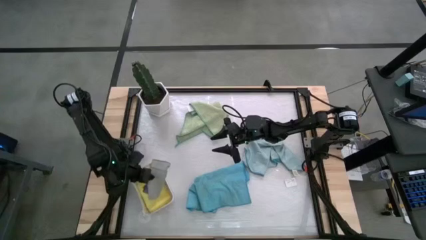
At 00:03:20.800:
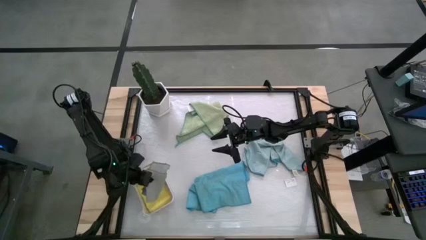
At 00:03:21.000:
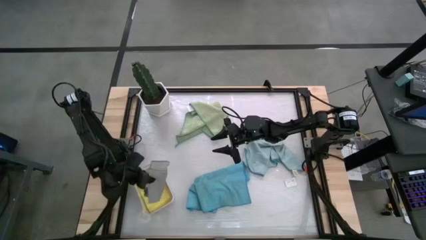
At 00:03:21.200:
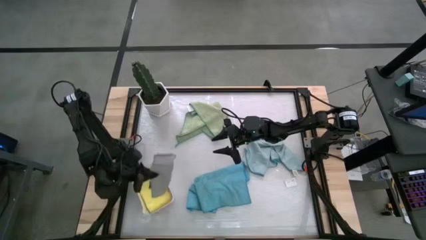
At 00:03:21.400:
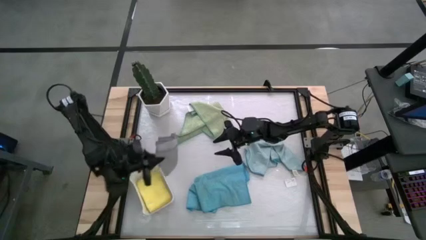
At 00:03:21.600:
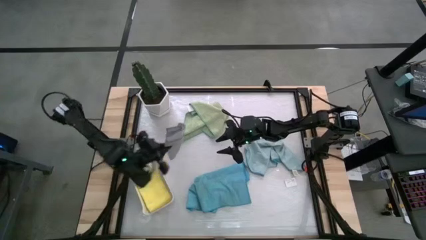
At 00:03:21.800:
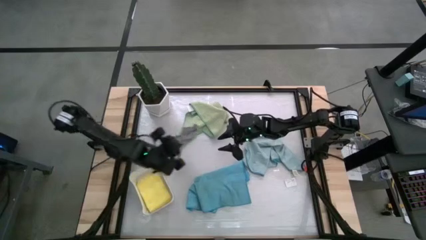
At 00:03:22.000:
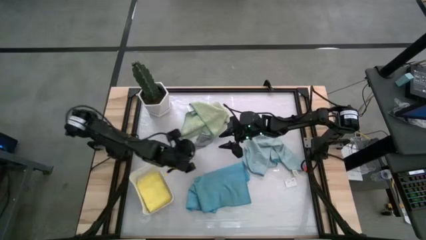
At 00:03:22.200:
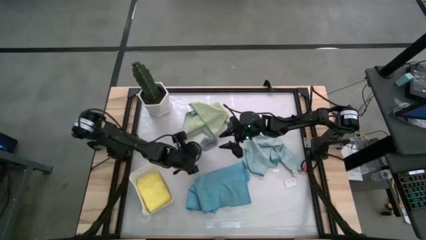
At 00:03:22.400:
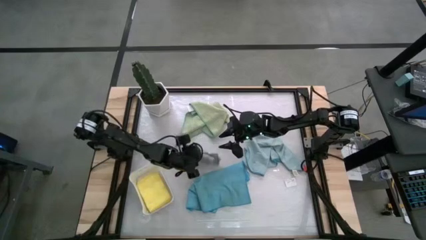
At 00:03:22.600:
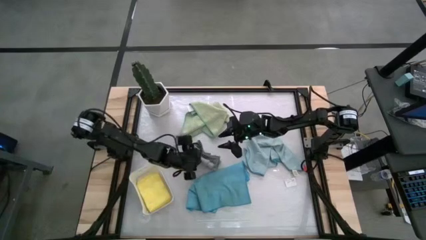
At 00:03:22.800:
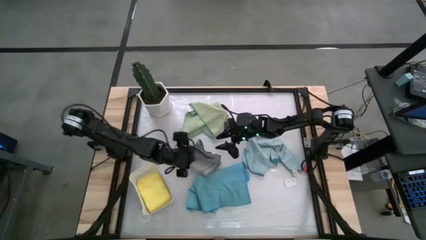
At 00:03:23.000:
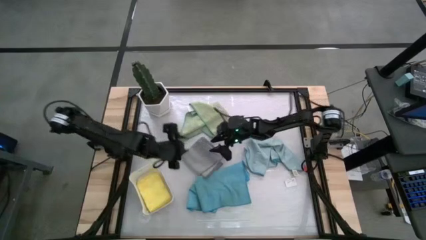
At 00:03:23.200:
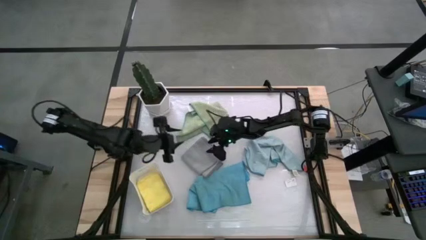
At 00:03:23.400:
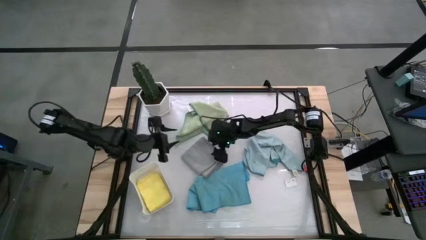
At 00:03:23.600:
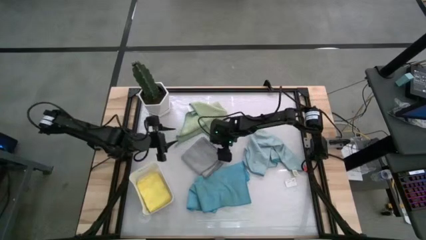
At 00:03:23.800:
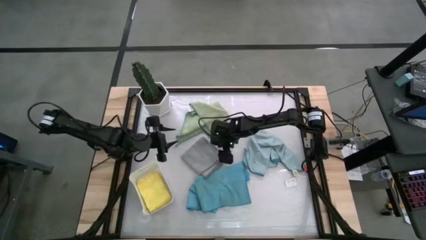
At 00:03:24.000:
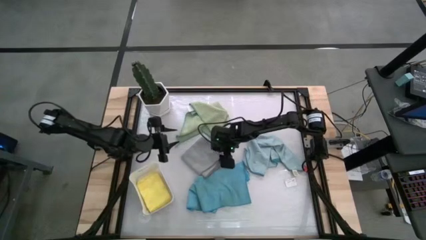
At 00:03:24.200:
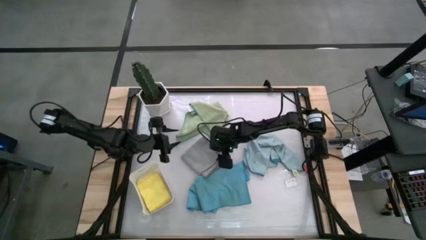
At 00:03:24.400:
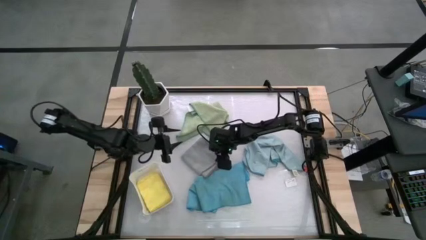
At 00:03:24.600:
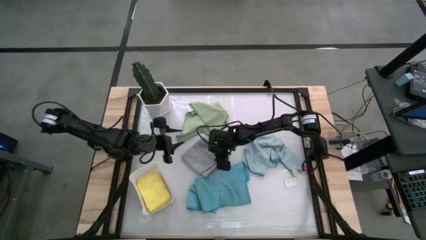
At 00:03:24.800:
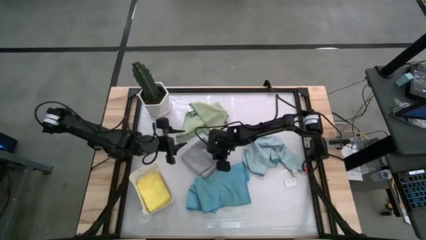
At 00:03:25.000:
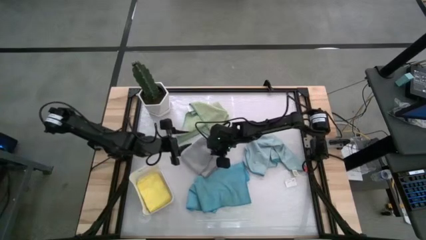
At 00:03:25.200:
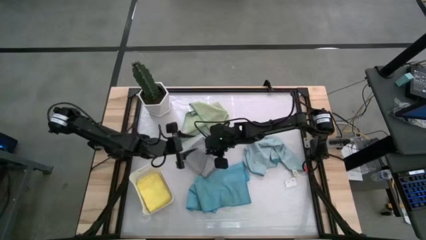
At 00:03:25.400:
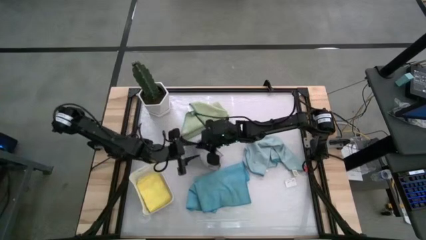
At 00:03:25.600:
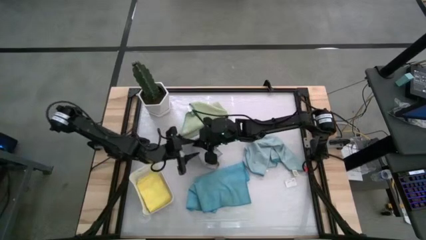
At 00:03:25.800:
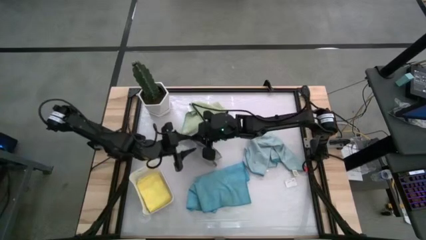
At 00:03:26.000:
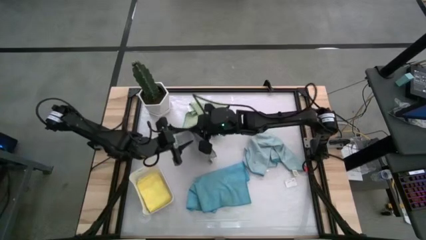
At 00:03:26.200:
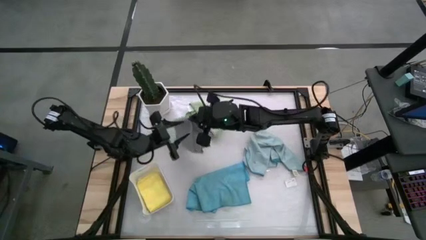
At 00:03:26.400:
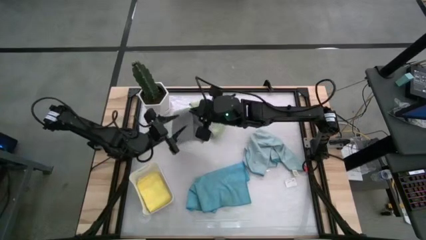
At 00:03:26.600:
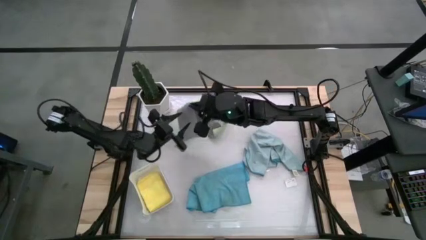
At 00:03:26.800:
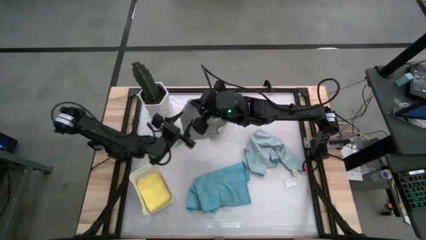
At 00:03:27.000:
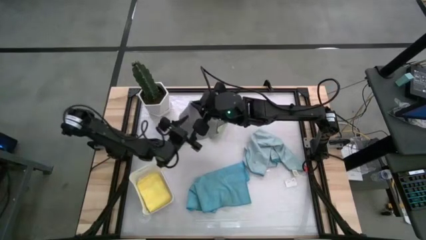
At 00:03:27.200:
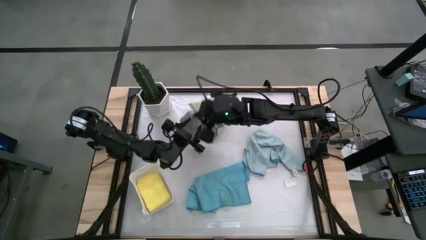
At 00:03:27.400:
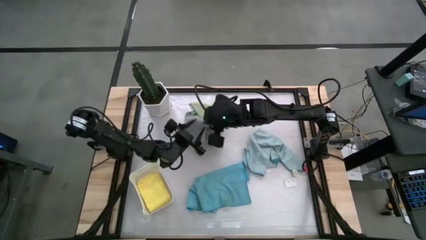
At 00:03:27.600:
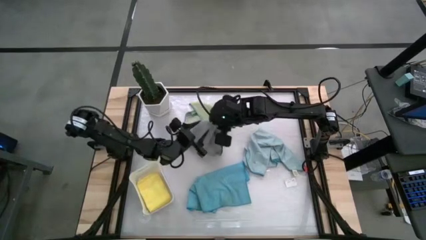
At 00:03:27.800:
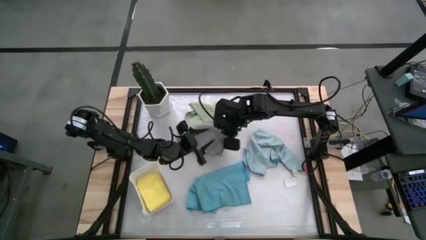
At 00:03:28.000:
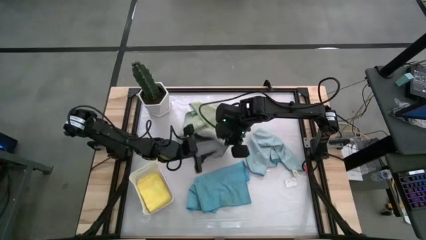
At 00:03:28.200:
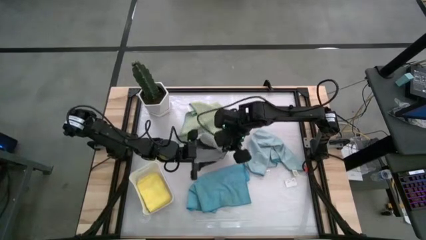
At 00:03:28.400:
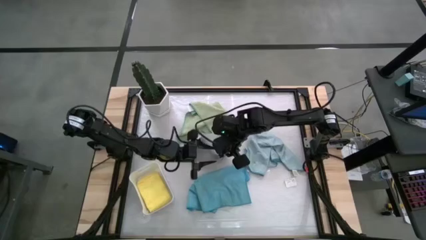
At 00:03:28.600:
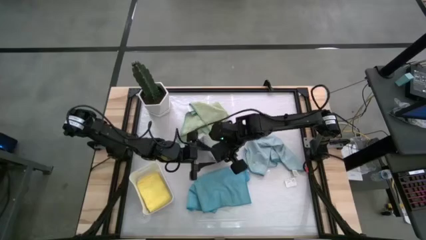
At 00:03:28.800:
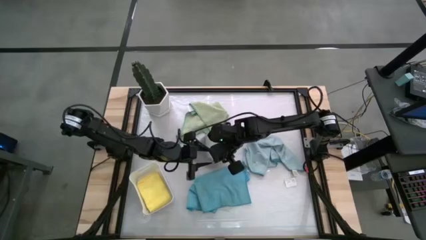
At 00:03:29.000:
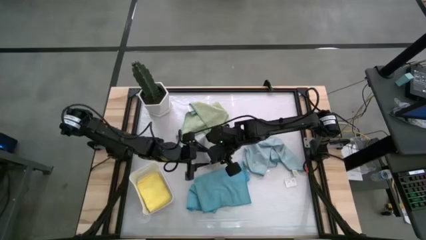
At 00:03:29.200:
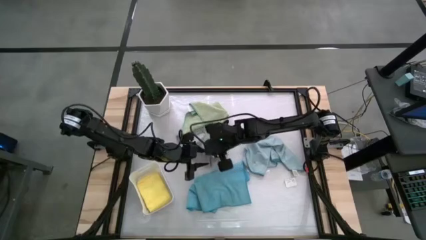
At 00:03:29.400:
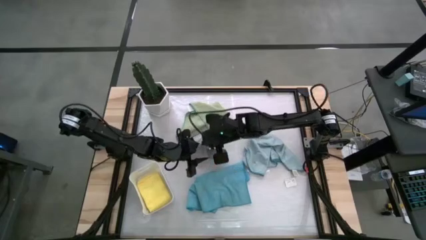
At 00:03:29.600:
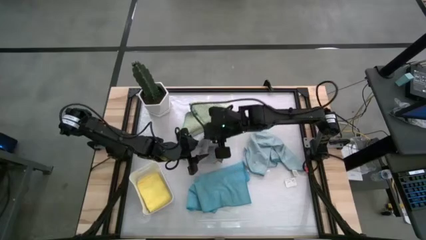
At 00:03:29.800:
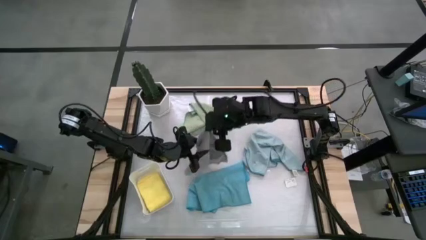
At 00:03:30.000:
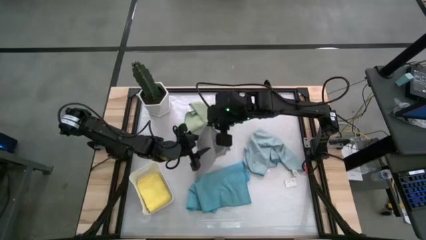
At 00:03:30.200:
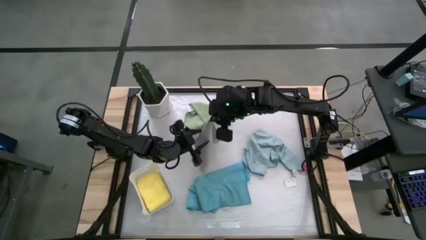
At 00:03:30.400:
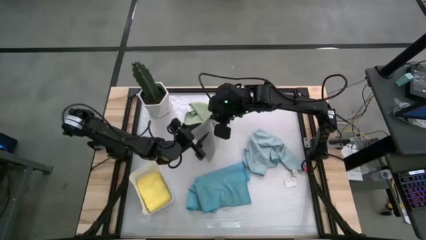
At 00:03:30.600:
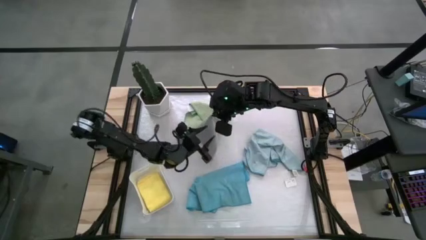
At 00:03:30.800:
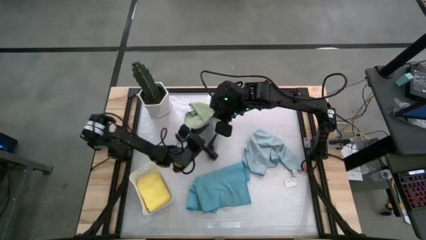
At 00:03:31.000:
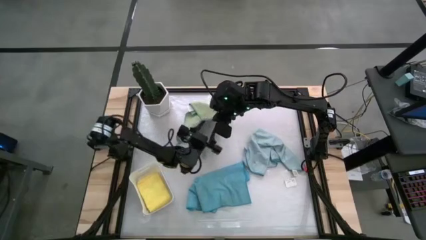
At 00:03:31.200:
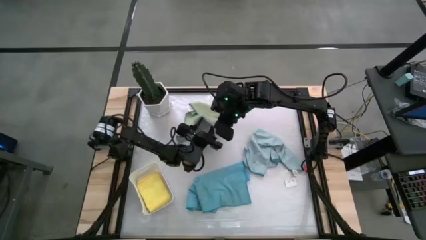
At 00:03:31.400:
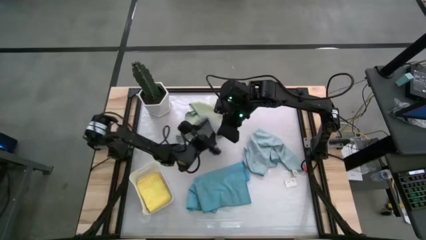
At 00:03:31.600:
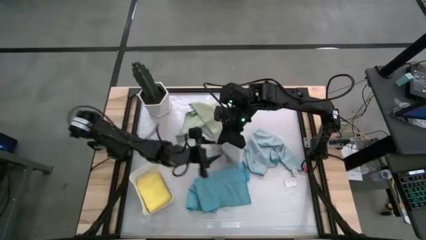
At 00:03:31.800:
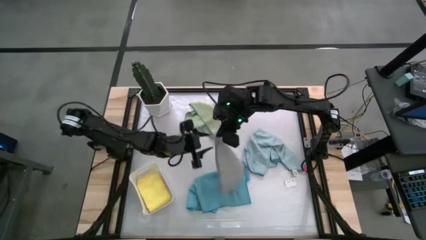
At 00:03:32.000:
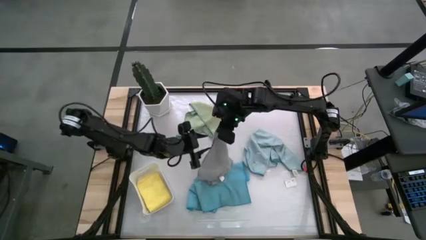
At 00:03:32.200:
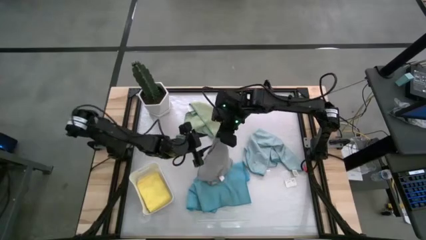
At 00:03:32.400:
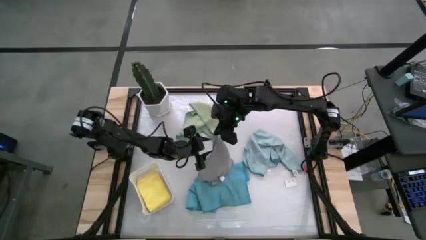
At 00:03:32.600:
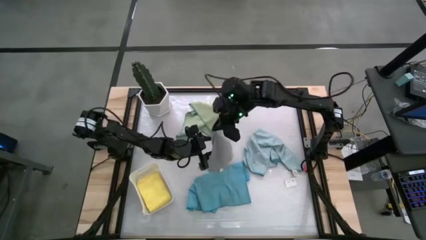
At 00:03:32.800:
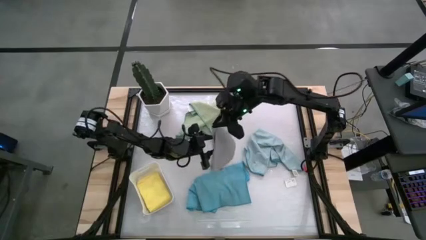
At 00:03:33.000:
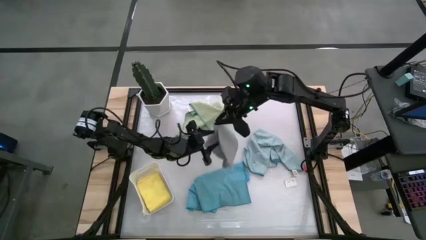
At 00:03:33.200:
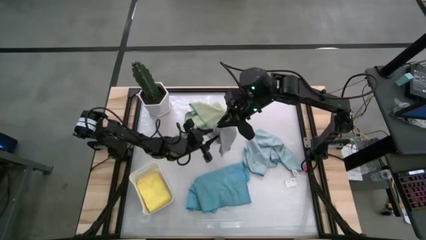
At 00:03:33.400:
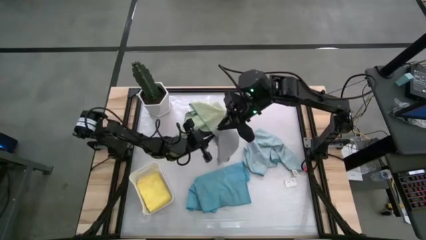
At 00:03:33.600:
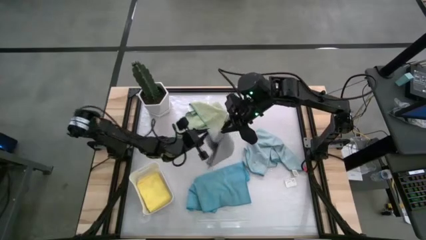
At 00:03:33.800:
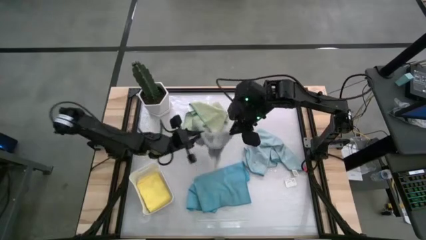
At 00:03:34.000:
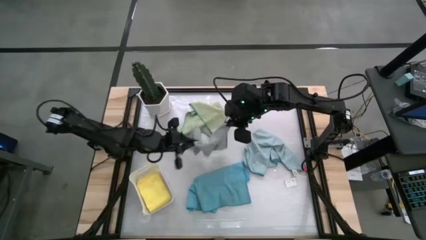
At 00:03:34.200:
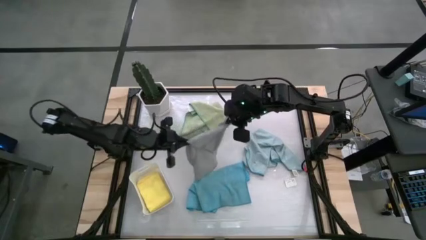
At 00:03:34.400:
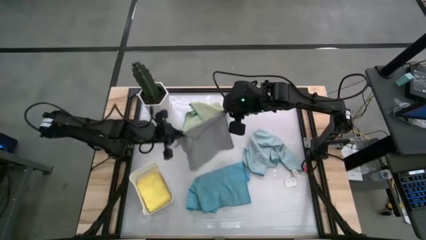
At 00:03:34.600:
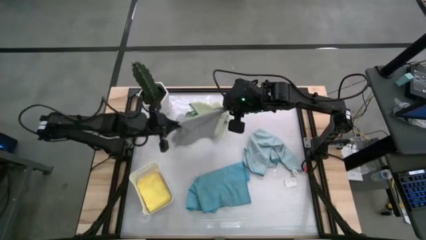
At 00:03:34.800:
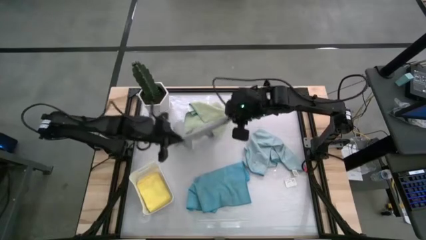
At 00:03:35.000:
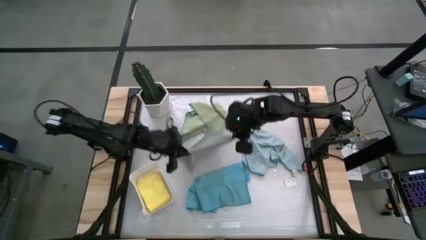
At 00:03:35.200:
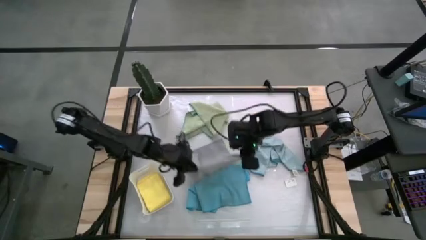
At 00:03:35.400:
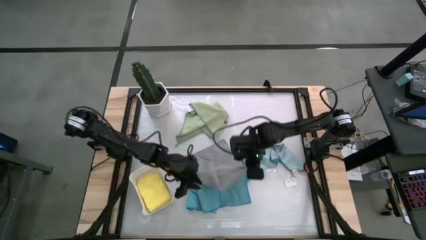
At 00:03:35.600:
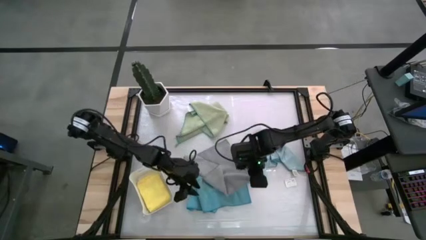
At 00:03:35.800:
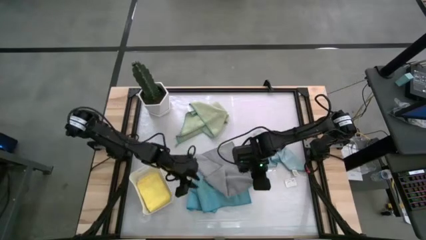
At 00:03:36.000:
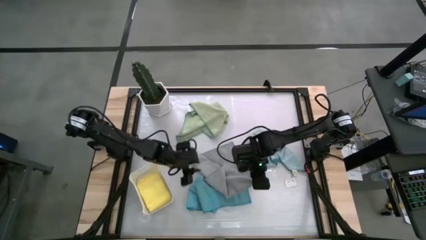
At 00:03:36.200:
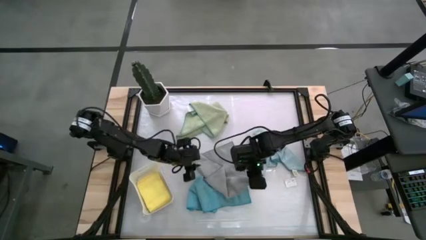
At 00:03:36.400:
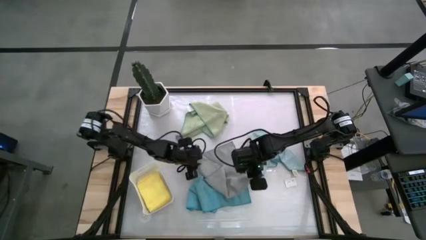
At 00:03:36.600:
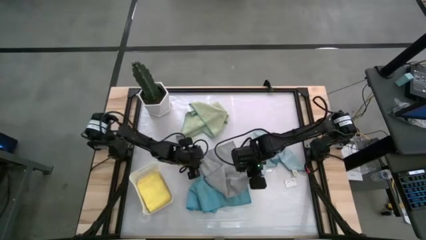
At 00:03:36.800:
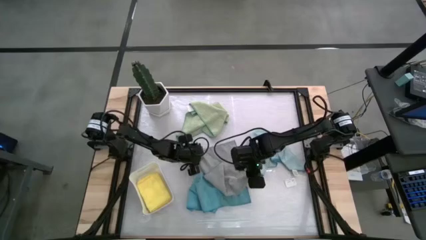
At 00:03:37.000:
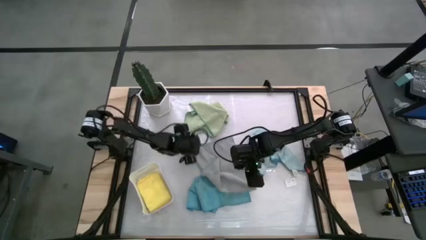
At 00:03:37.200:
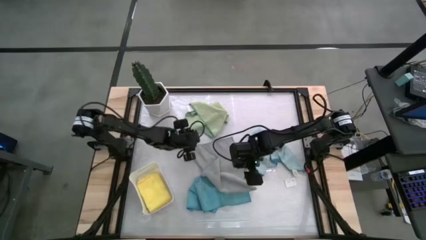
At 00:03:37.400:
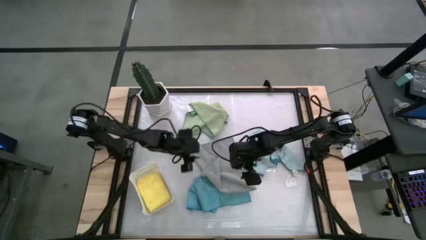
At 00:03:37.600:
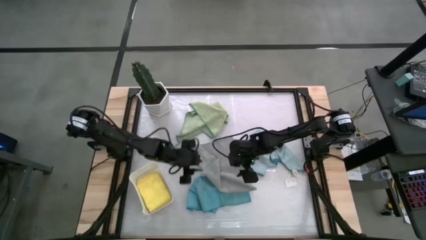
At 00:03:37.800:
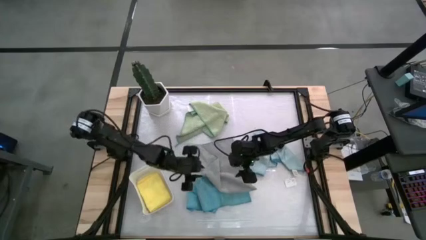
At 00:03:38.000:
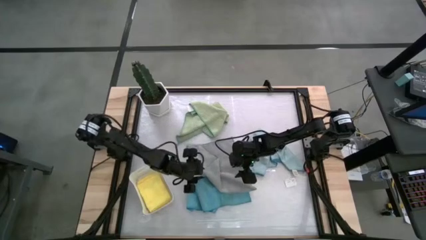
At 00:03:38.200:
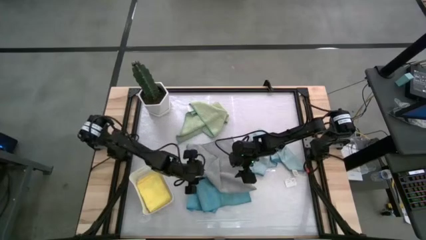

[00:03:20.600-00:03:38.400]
Task: Fold microfiber towels
Fold the gray microfiber towel
